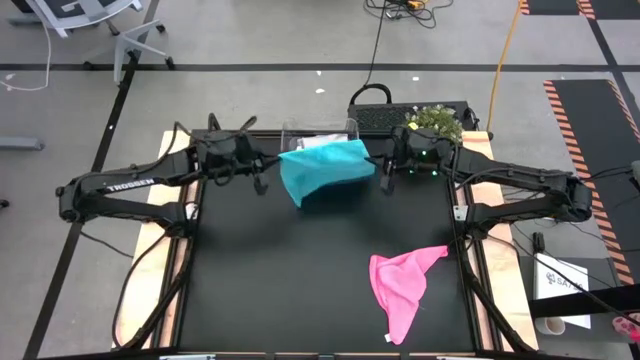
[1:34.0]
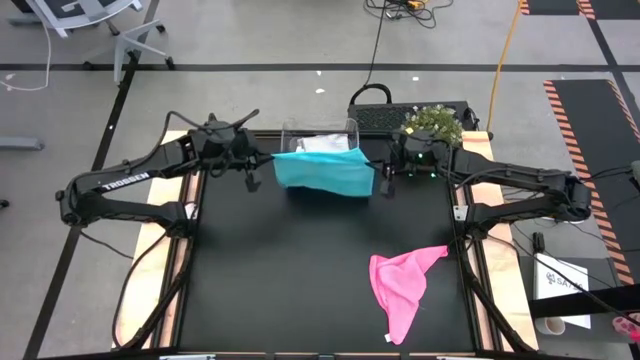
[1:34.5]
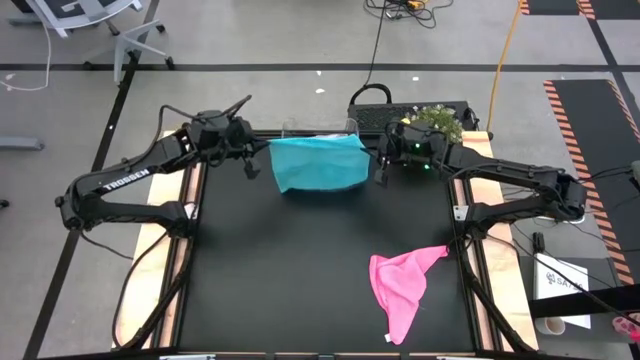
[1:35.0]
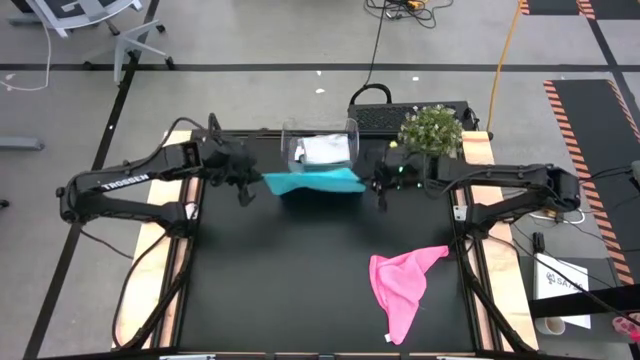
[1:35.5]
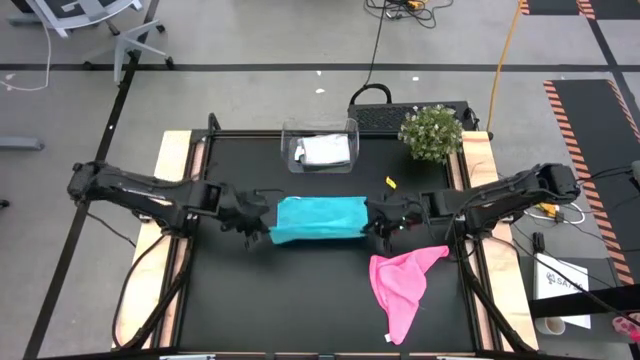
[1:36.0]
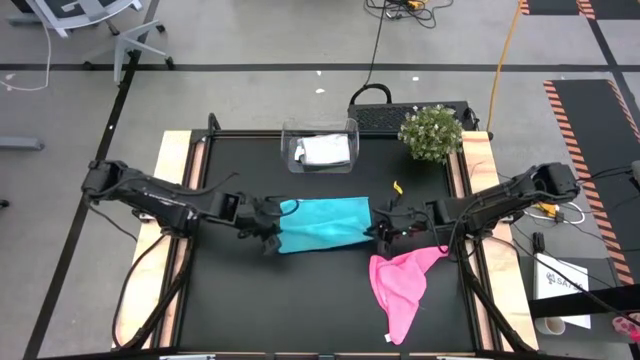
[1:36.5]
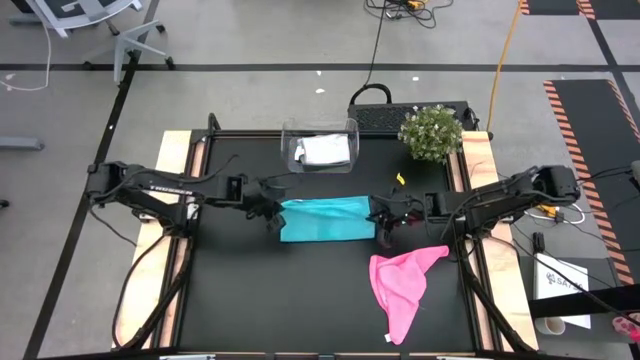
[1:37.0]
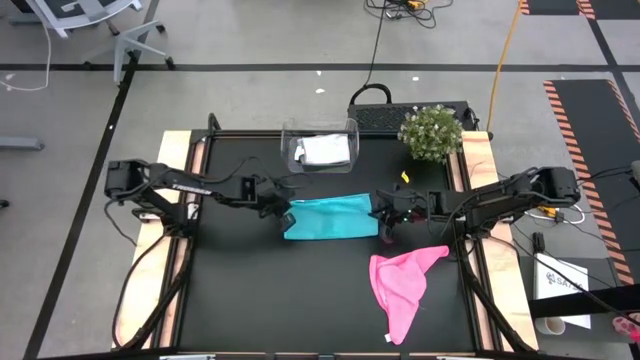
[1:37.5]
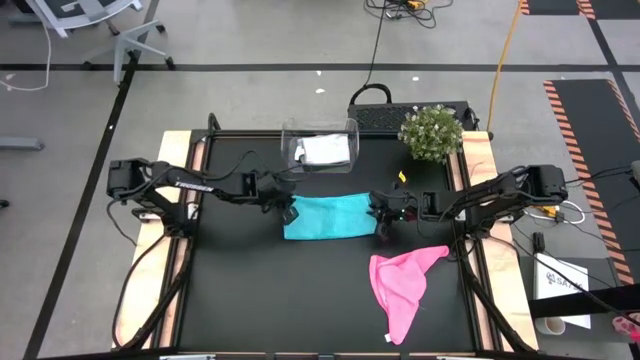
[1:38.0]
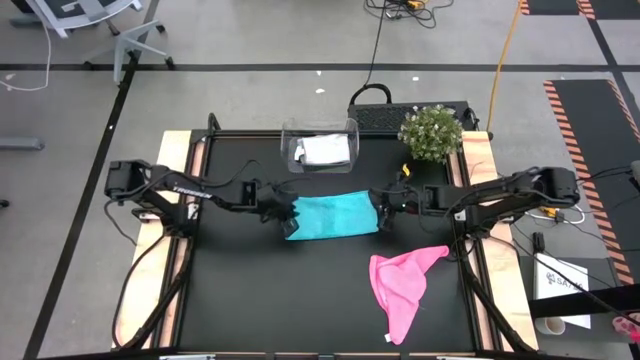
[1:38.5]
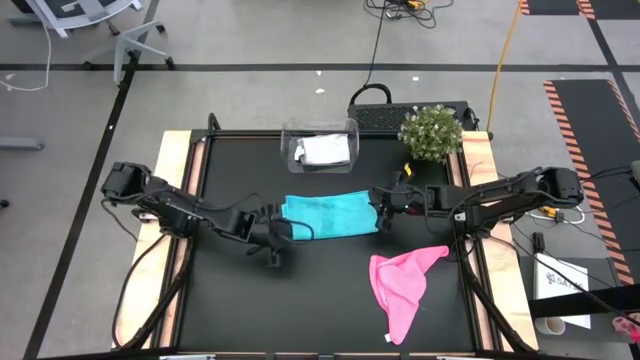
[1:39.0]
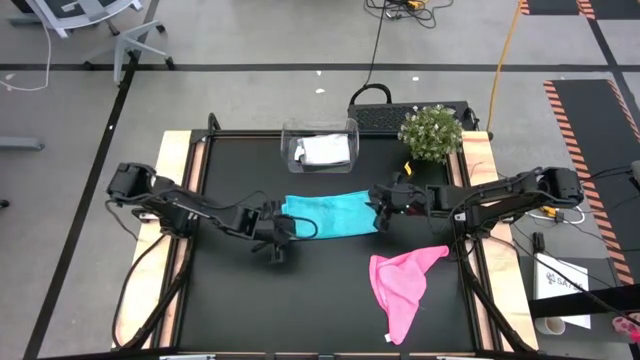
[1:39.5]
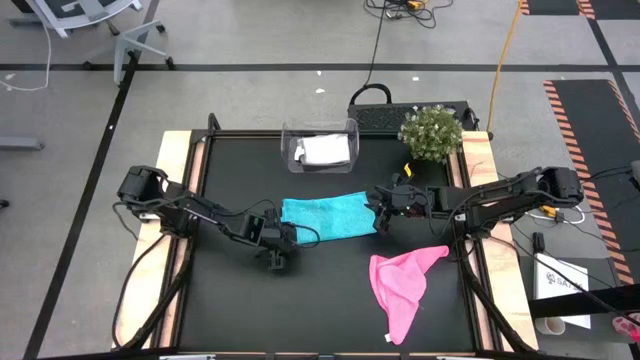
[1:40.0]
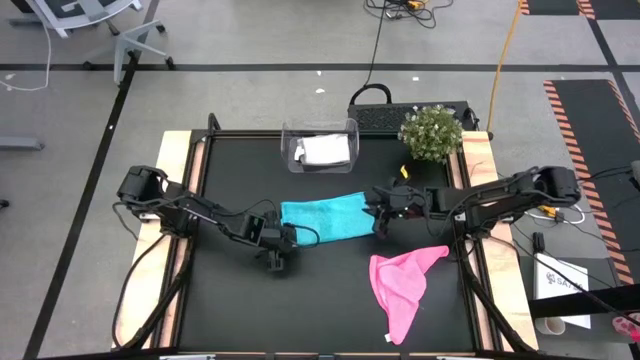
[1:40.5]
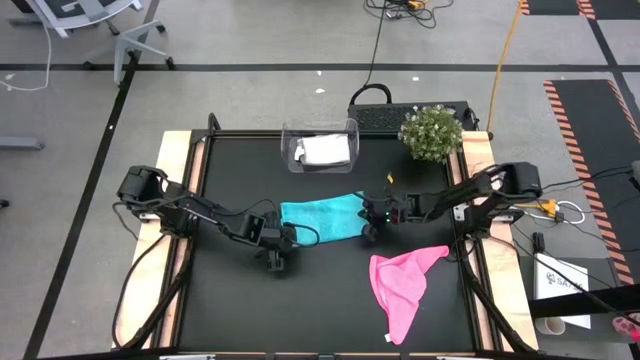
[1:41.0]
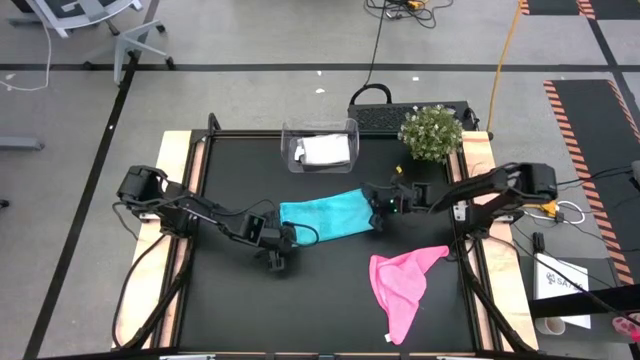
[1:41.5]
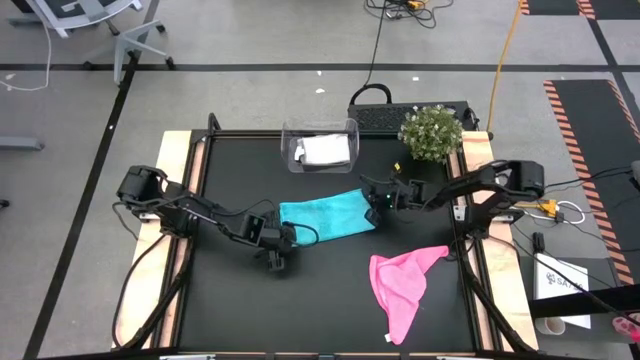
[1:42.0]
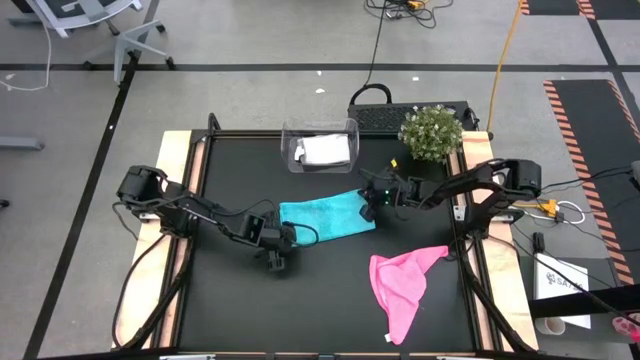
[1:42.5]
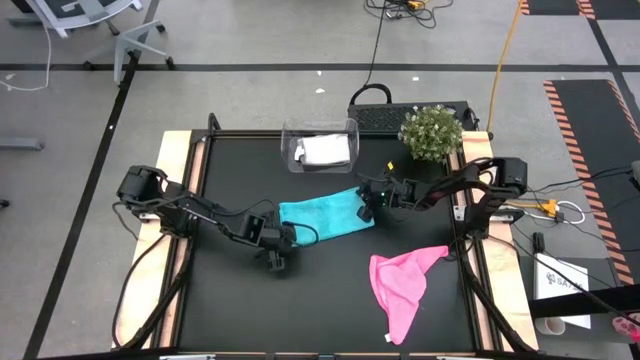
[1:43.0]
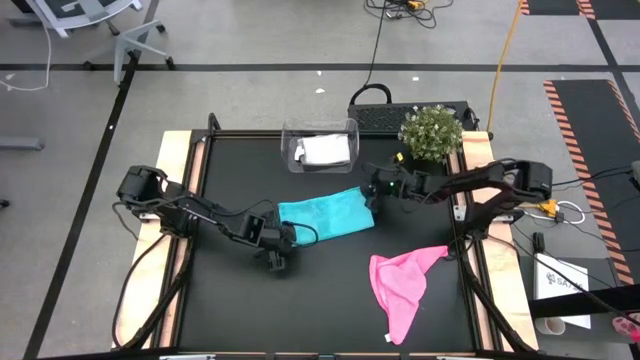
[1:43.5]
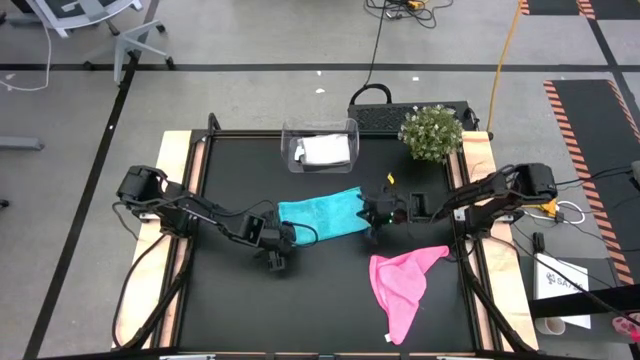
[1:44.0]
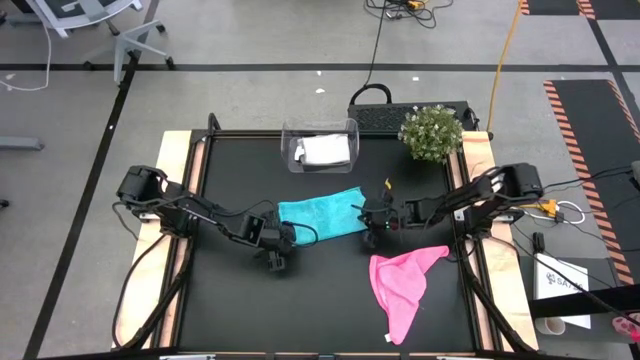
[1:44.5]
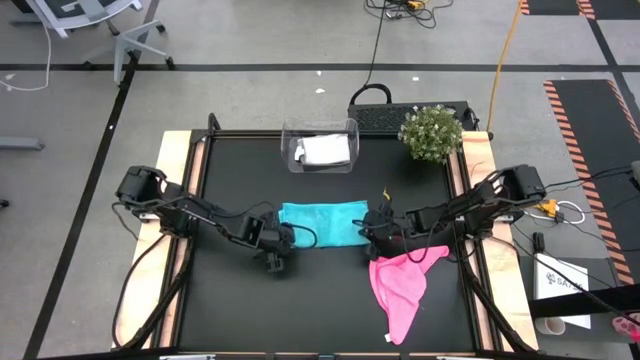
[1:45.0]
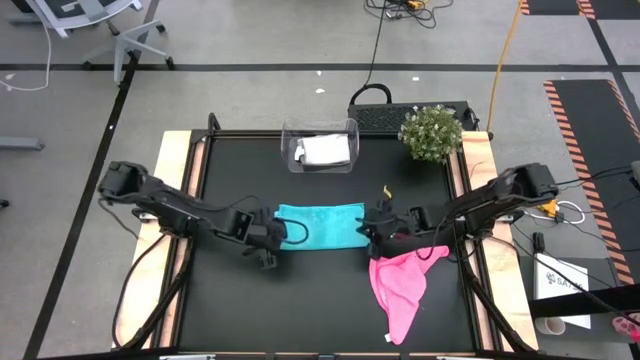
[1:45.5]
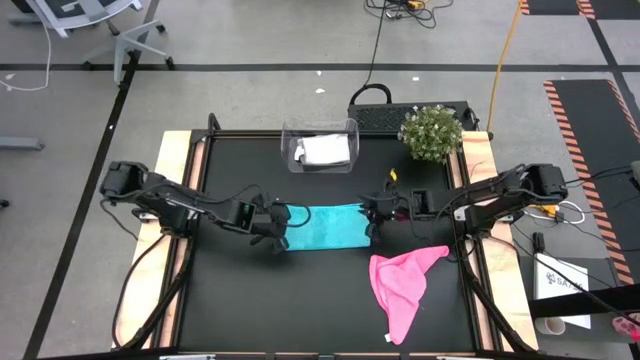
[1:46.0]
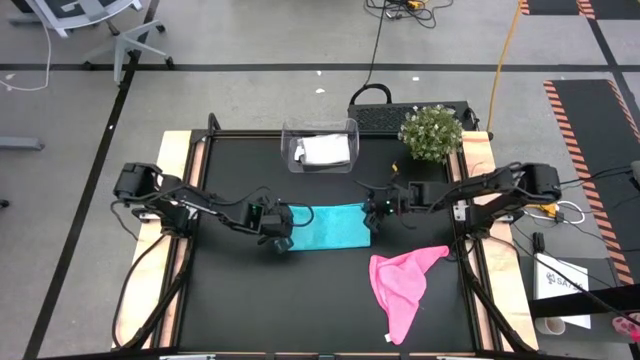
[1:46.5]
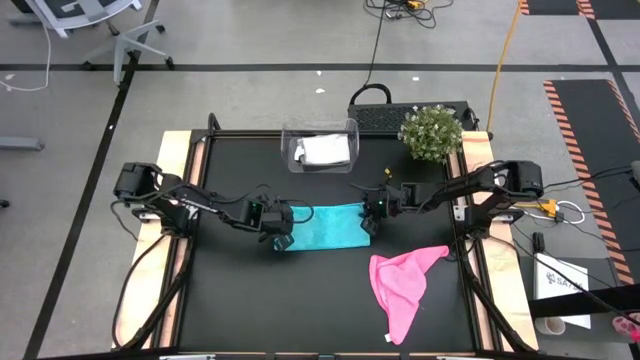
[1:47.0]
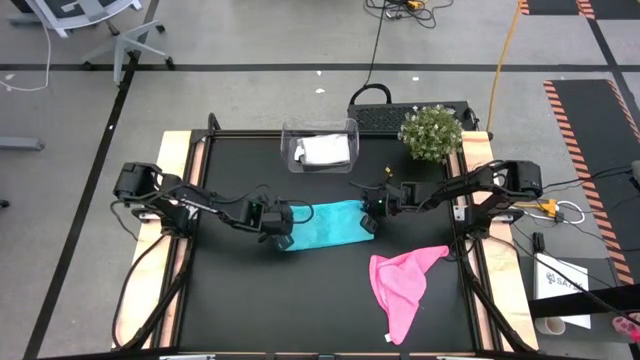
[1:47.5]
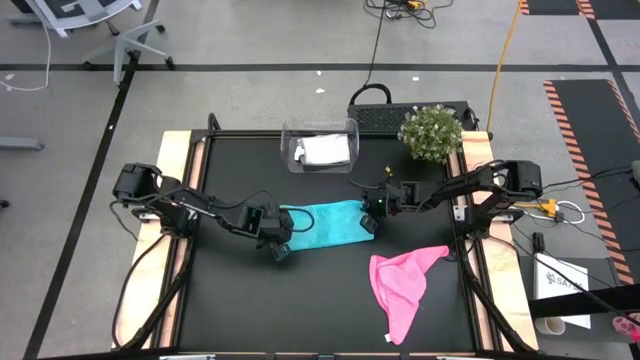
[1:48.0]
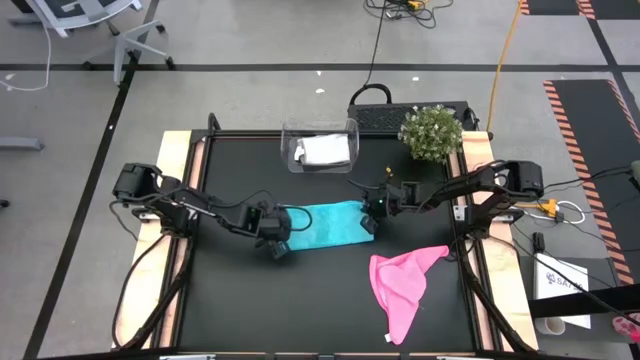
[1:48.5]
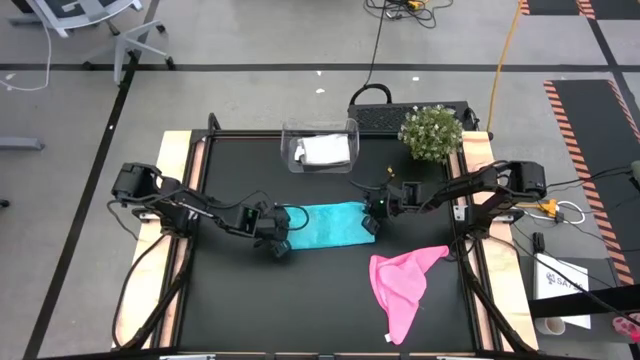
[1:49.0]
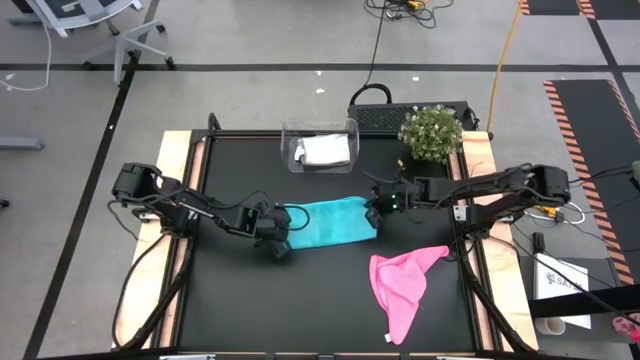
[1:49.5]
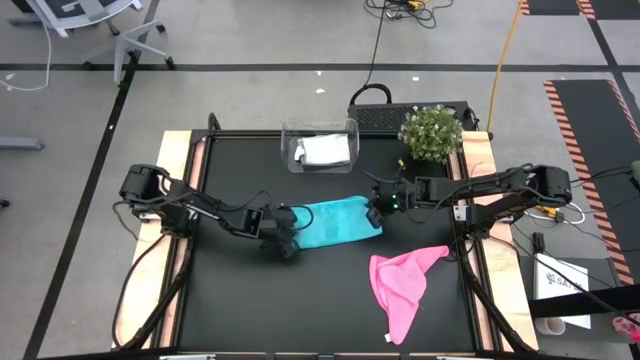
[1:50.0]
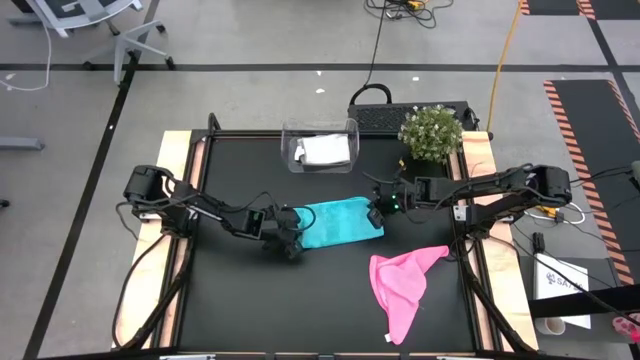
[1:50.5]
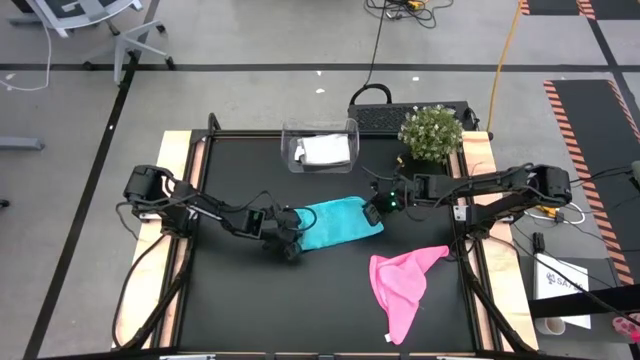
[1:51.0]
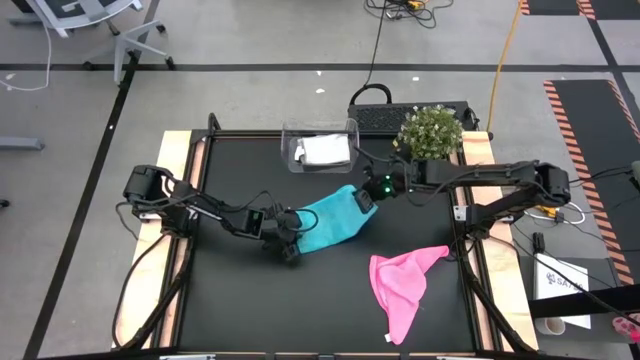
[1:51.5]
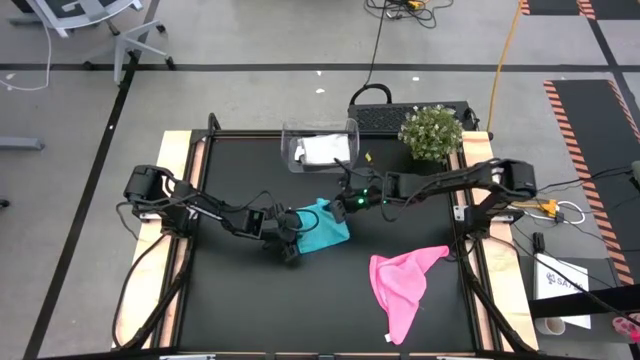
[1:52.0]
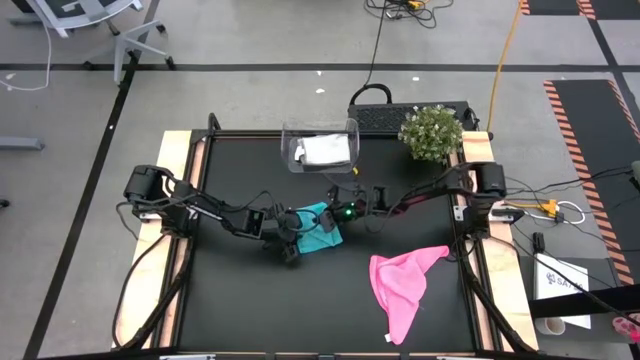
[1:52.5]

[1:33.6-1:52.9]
Task: Fold microfiber towels
Fold the light blue microfiber cloth

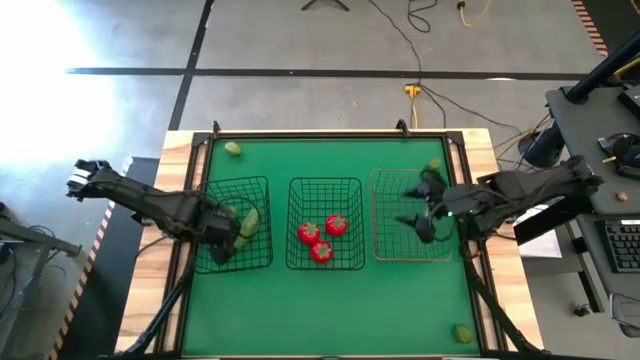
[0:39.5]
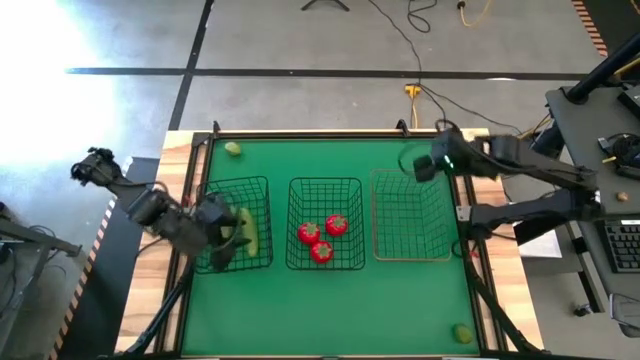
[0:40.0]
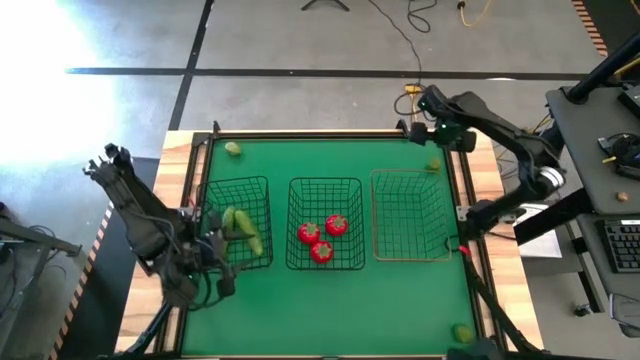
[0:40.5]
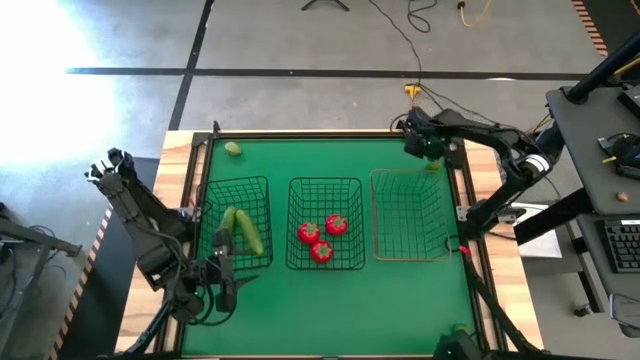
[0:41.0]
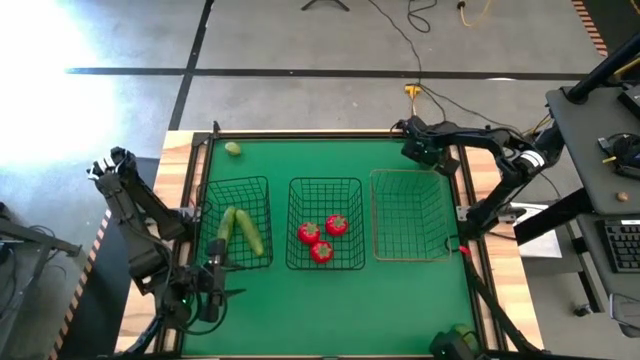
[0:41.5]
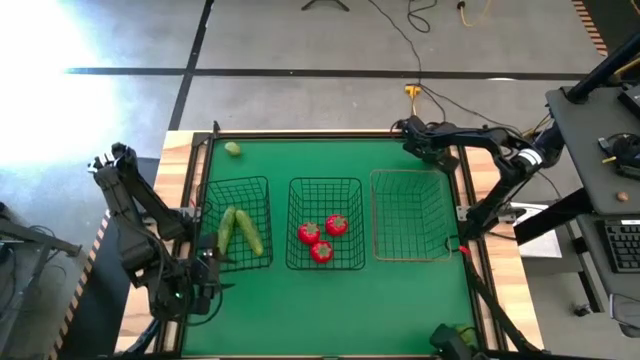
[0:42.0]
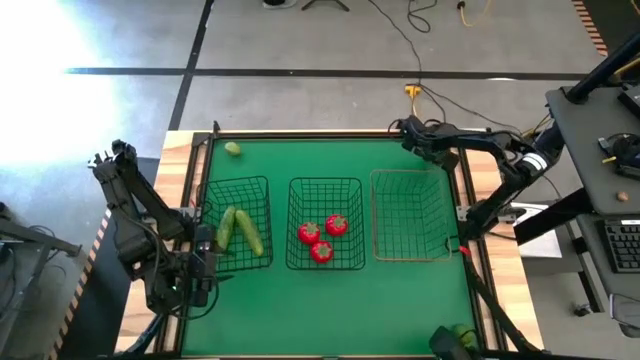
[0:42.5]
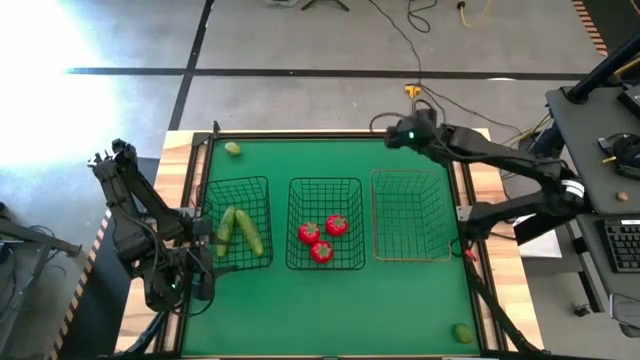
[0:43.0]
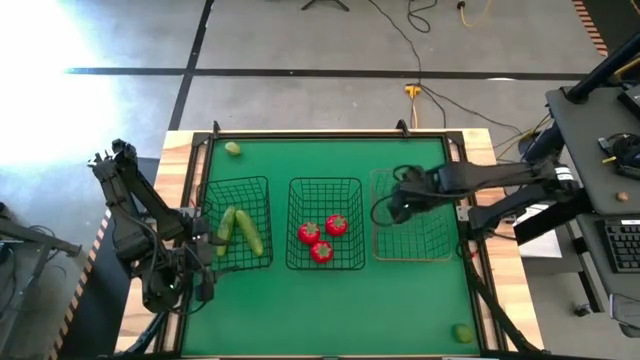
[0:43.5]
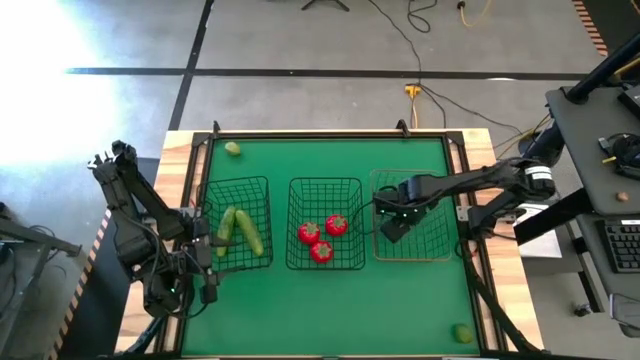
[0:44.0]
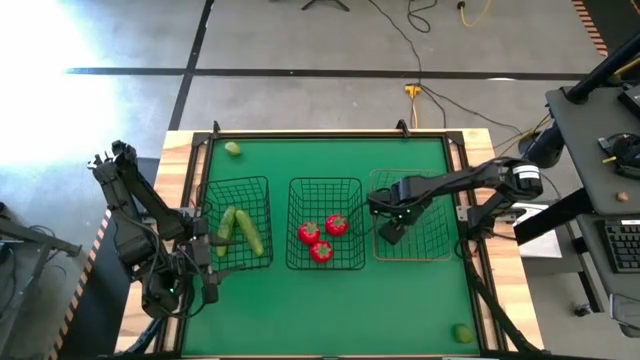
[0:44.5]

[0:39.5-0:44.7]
Task: Sort produce into baskets
Put the top right lime into the gold wire basket
